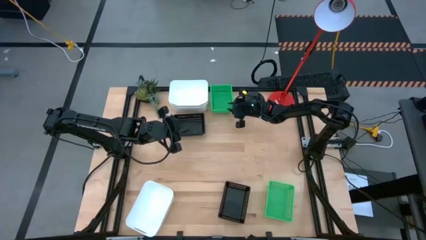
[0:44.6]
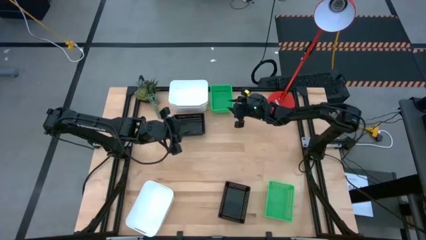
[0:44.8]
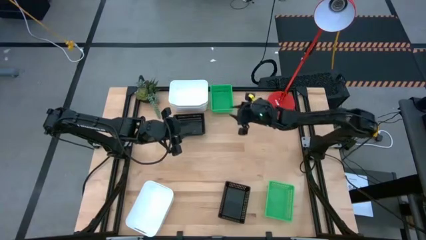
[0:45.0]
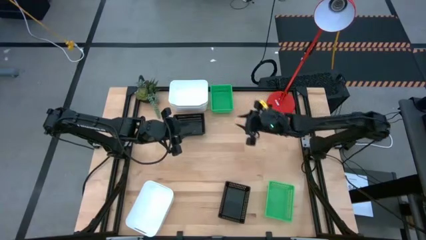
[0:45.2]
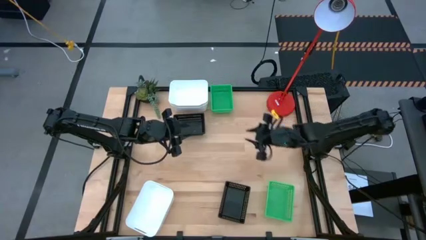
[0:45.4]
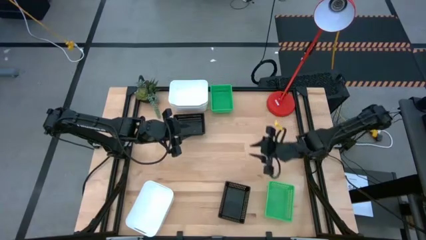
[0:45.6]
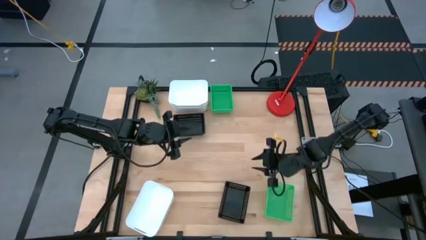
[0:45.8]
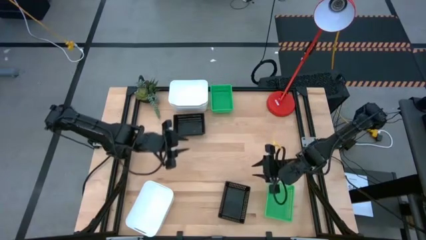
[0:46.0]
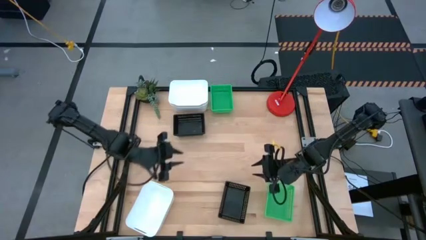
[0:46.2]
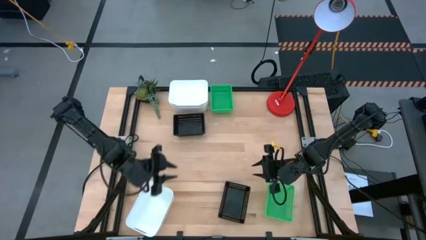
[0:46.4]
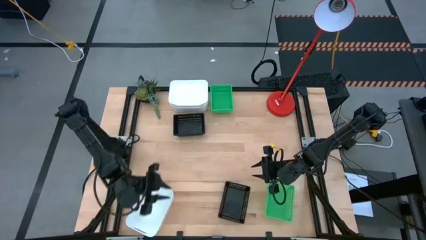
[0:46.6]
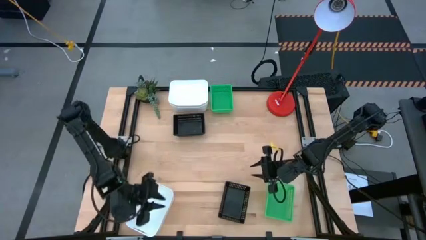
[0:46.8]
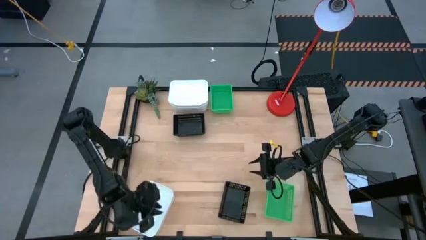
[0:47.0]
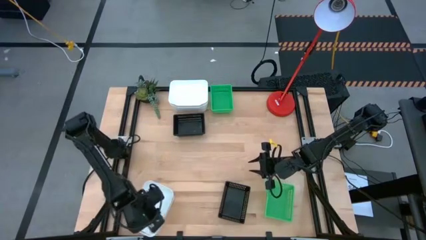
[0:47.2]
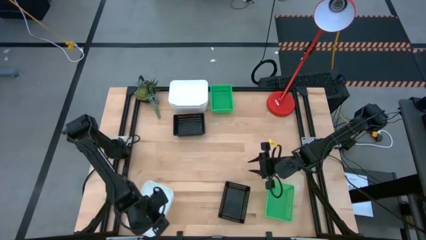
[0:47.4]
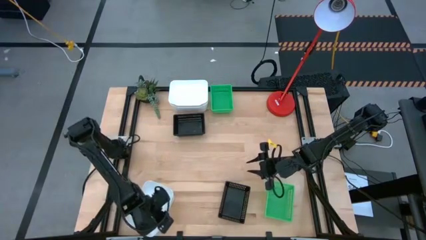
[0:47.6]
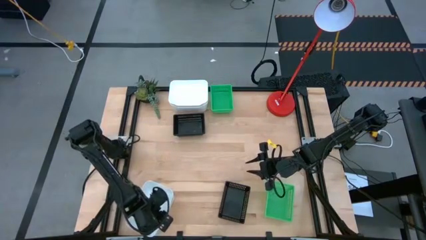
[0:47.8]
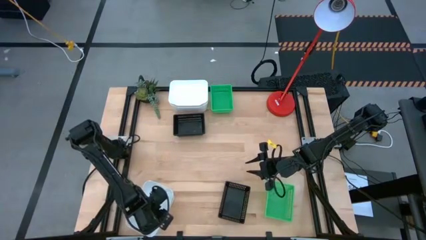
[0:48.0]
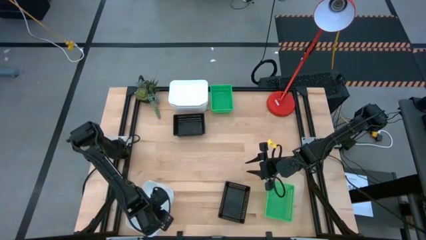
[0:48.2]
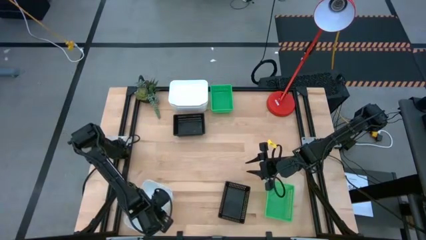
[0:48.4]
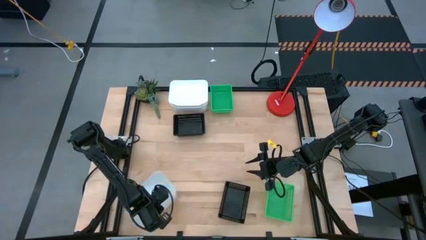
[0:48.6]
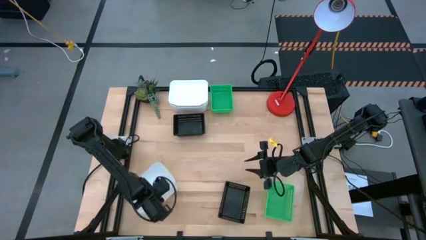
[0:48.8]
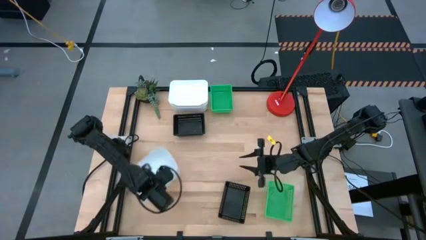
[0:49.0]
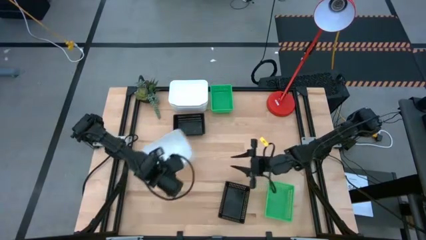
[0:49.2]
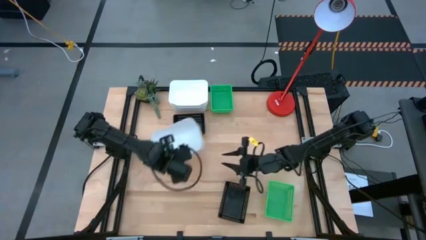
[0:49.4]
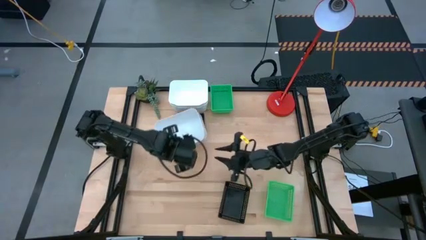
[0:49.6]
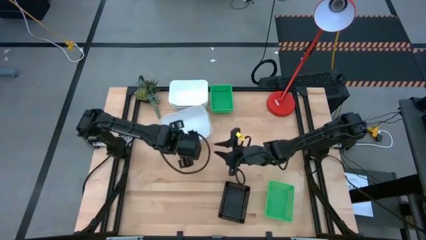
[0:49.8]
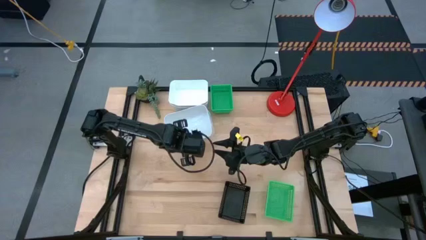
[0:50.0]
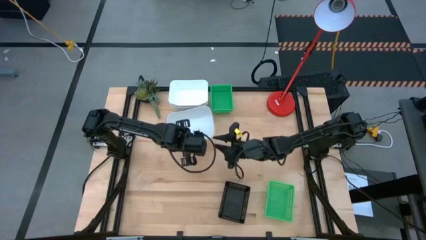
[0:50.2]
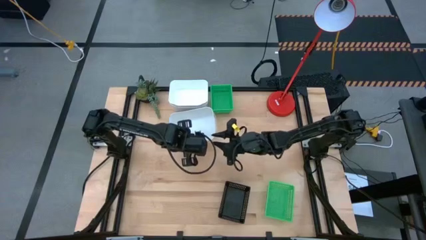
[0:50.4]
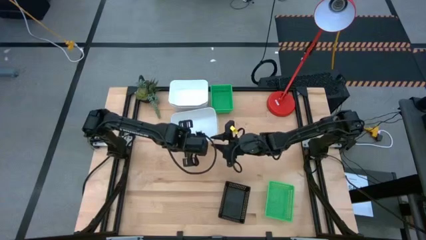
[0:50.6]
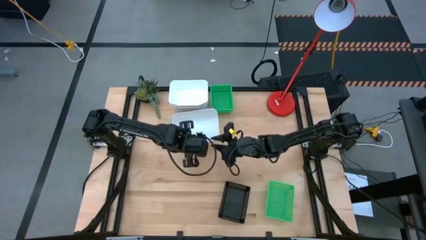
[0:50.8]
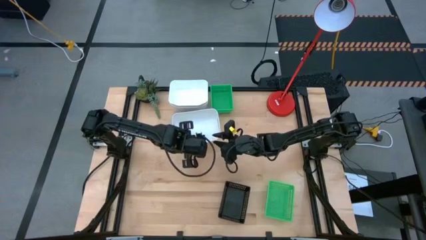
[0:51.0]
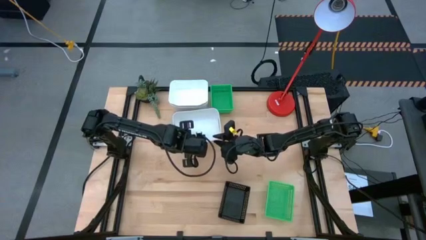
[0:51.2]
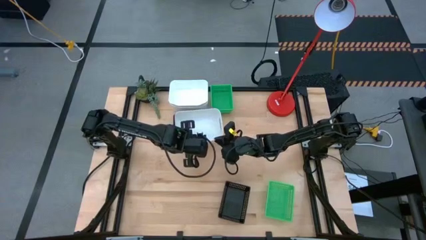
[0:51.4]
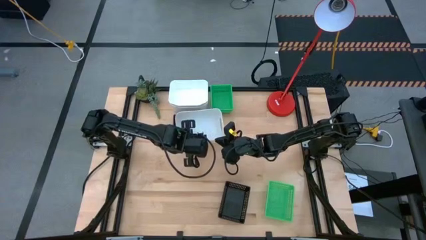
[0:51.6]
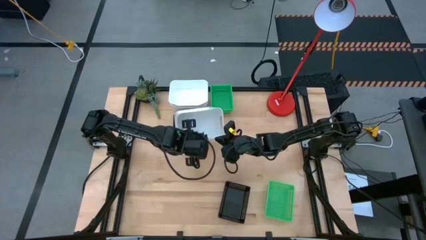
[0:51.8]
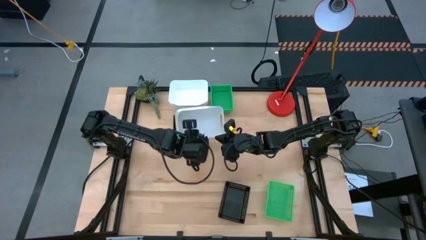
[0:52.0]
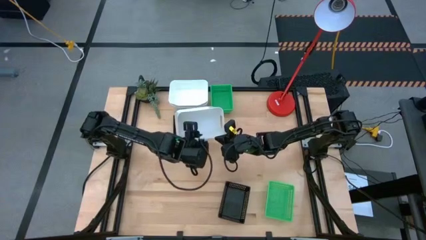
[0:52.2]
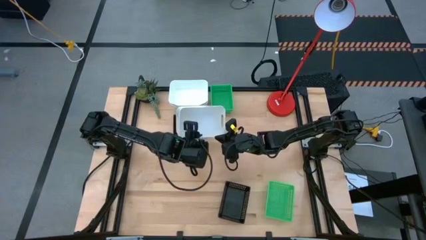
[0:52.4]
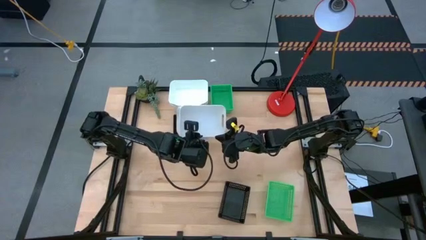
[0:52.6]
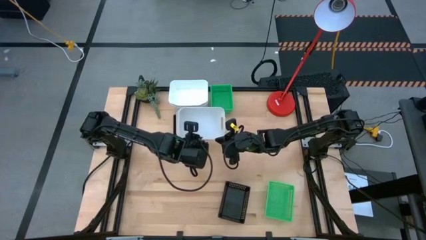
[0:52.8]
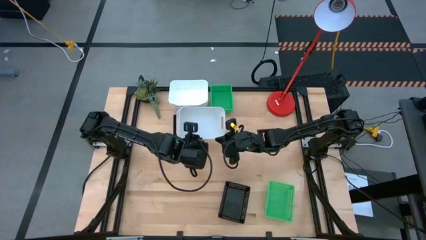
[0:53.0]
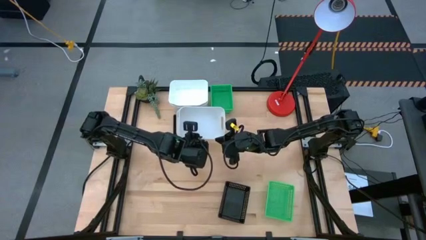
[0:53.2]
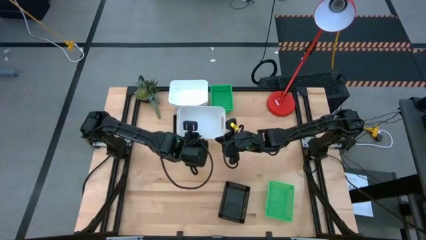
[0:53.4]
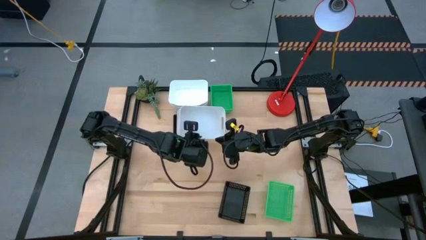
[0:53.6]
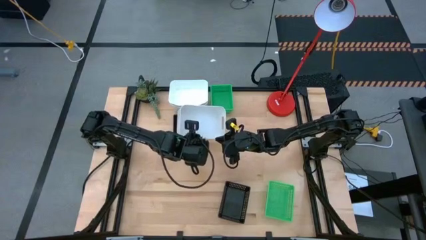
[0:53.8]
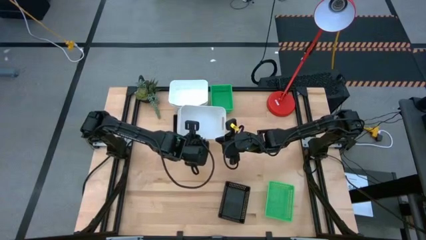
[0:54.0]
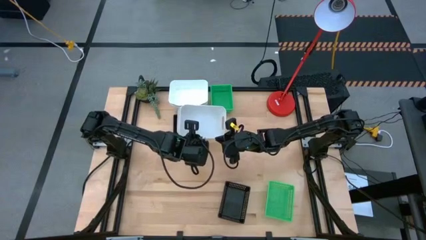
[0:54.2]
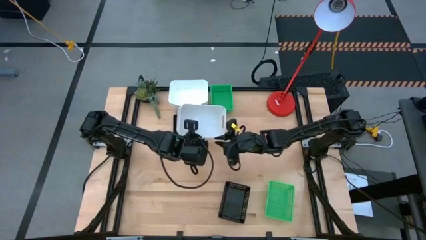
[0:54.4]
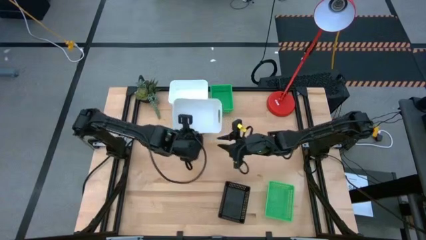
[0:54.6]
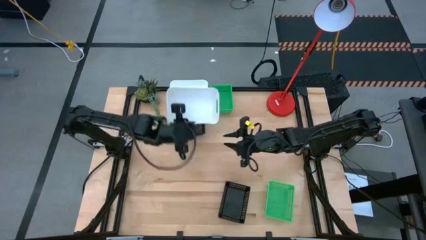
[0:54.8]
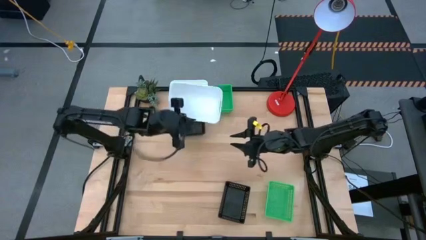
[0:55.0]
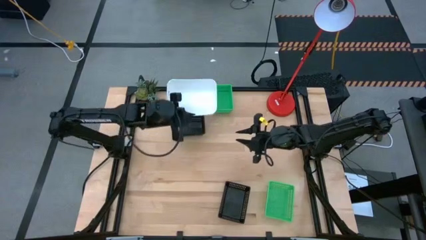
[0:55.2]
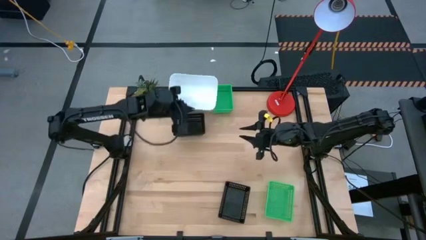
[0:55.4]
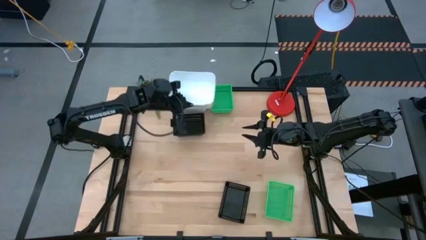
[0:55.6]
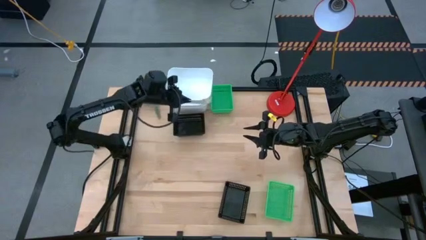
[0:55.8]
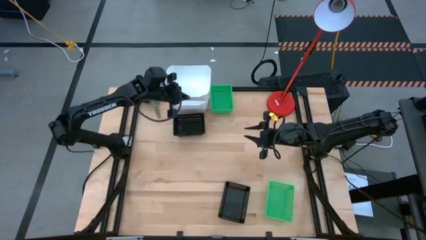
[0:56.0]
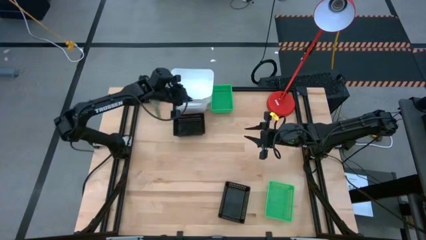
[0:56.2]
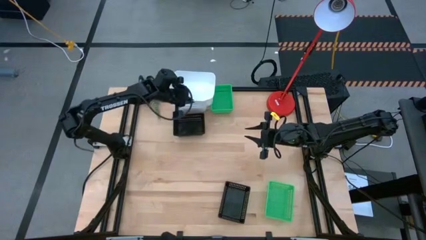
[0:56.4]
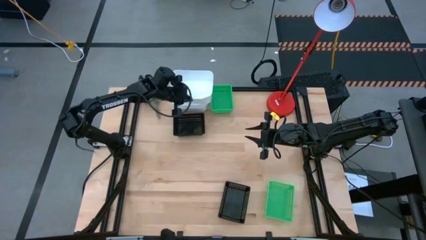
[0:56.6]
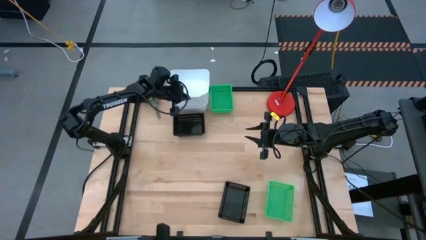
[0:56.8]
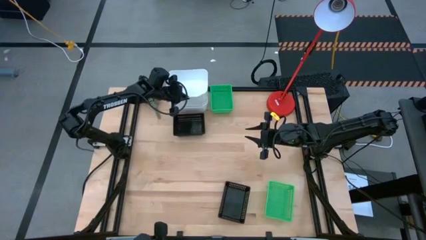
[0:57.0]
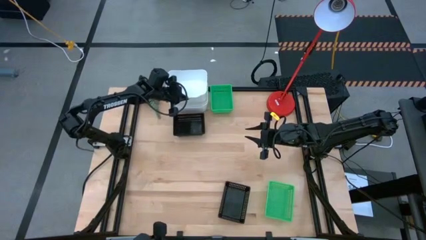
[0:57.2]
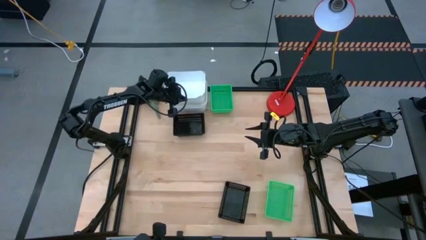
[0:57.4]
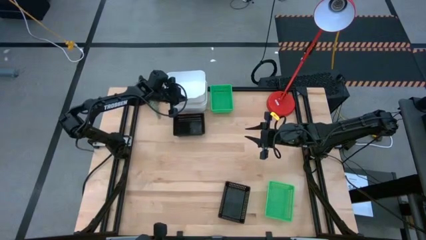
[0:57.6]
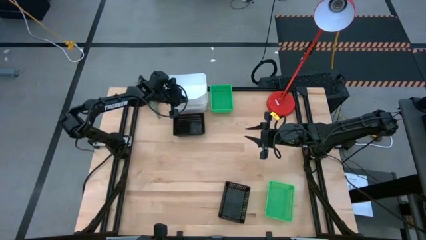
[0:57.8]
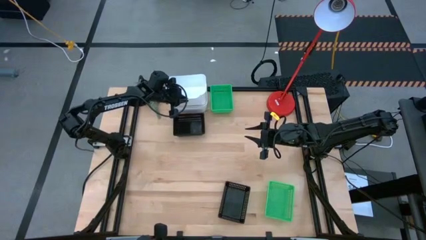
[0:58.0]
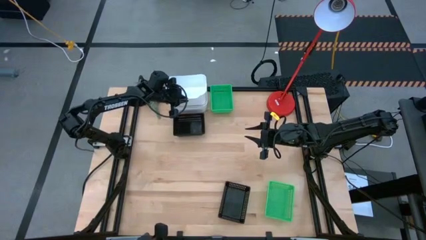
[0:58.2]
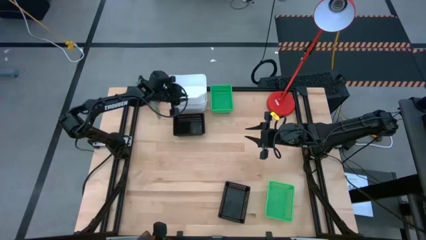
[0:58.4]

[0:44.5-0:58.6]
Stack the bottom white bin on top of the top white bins
